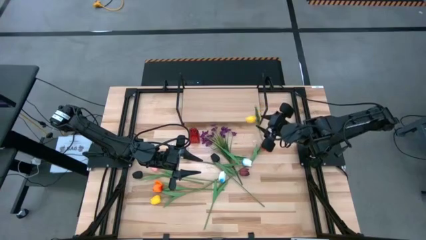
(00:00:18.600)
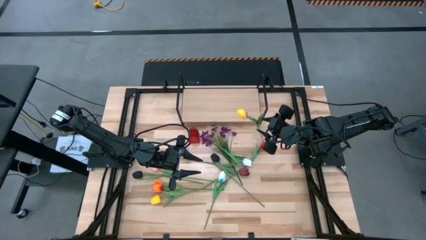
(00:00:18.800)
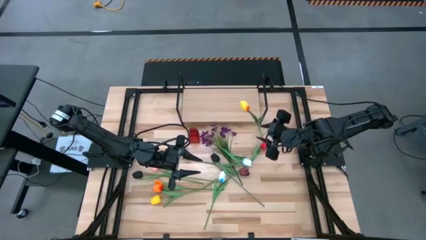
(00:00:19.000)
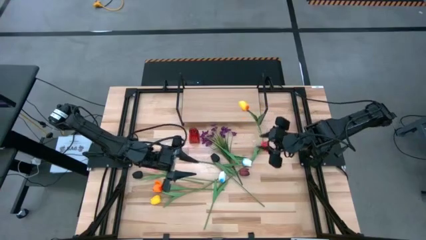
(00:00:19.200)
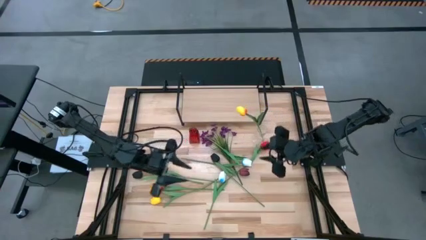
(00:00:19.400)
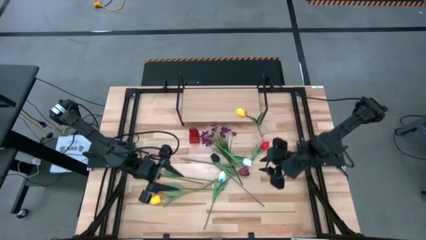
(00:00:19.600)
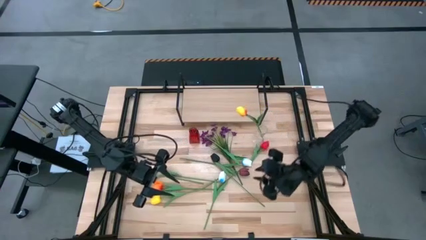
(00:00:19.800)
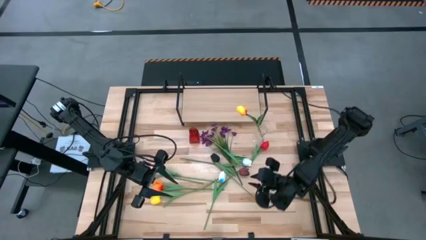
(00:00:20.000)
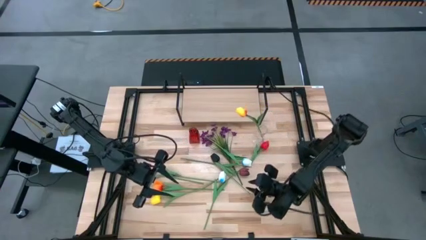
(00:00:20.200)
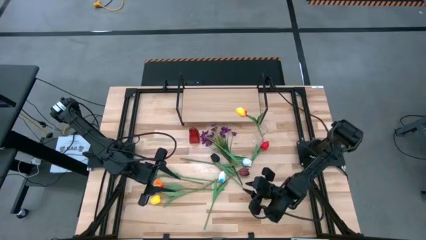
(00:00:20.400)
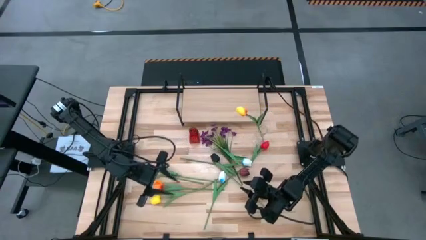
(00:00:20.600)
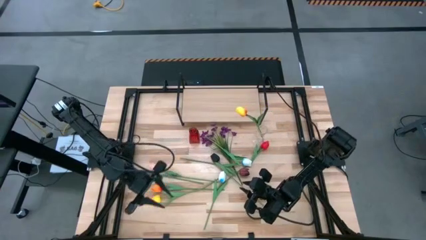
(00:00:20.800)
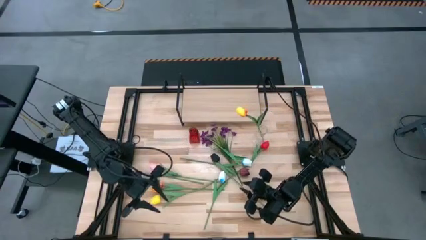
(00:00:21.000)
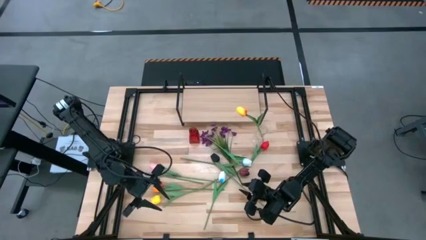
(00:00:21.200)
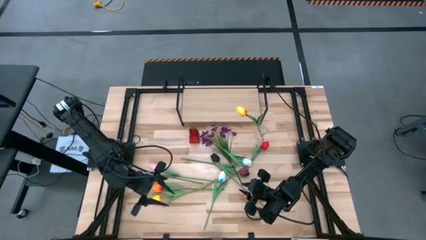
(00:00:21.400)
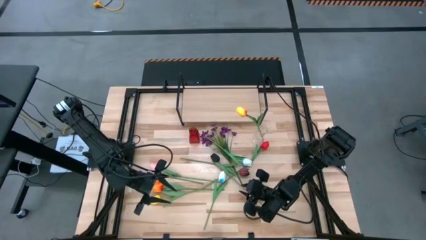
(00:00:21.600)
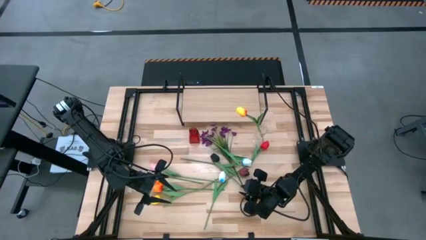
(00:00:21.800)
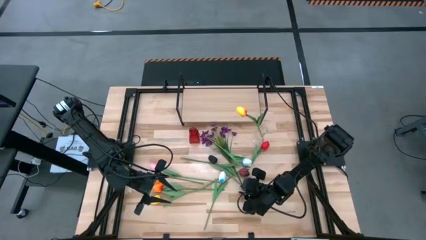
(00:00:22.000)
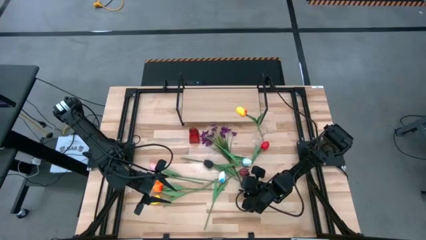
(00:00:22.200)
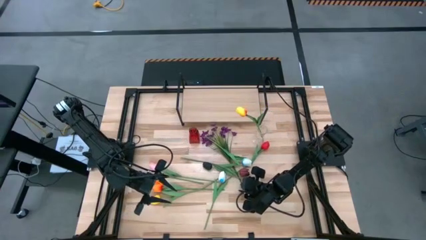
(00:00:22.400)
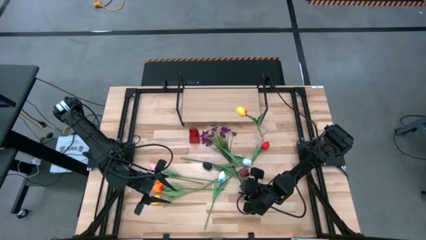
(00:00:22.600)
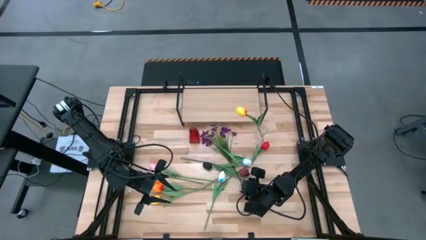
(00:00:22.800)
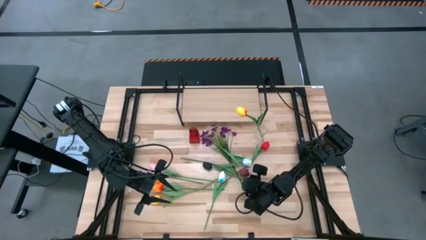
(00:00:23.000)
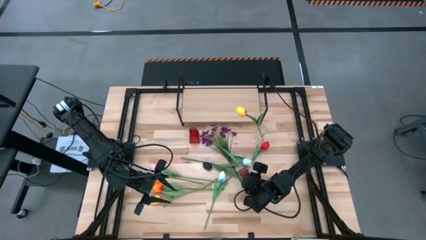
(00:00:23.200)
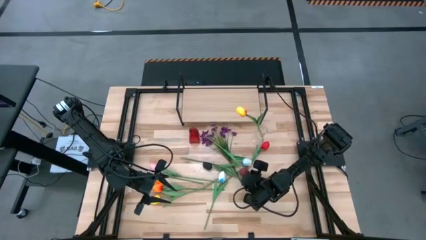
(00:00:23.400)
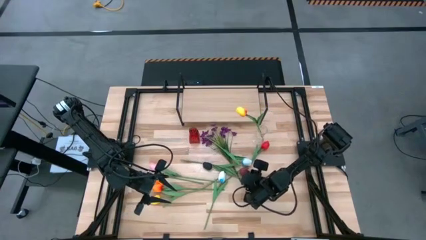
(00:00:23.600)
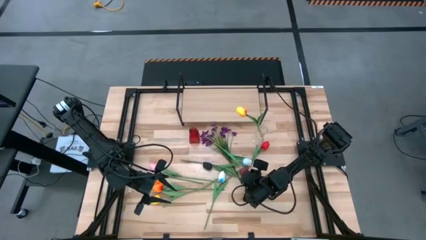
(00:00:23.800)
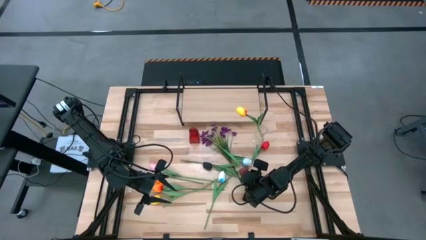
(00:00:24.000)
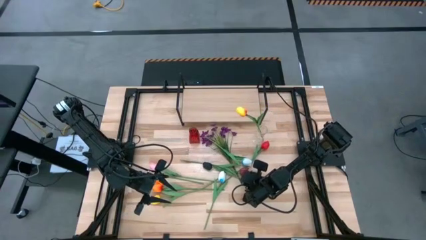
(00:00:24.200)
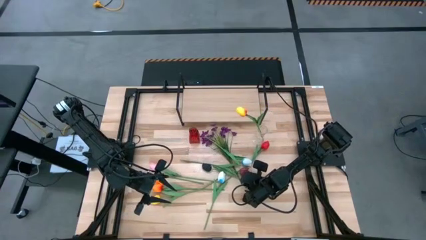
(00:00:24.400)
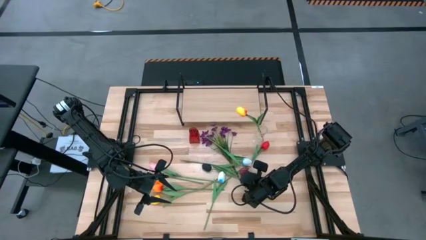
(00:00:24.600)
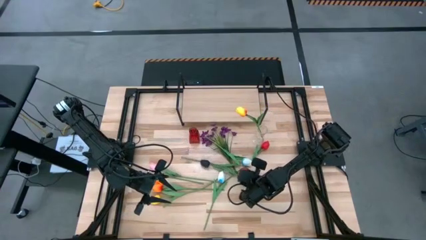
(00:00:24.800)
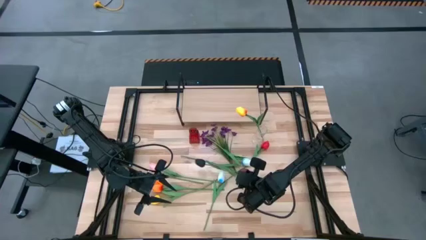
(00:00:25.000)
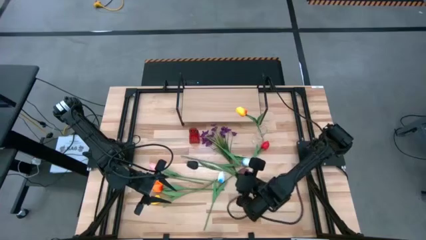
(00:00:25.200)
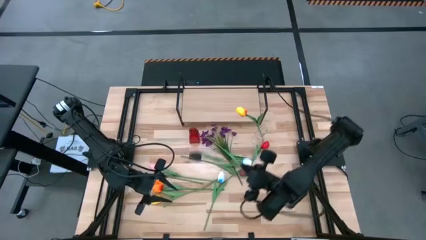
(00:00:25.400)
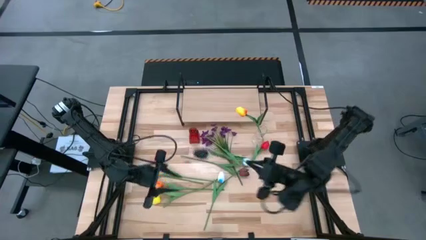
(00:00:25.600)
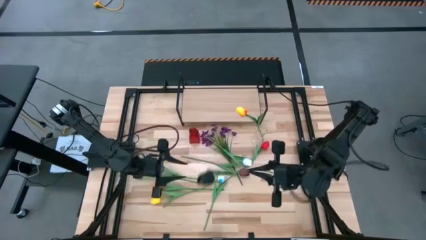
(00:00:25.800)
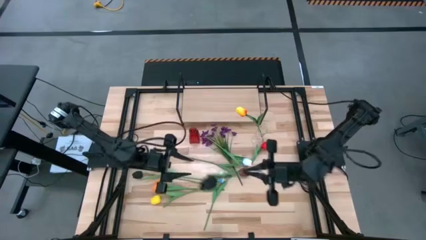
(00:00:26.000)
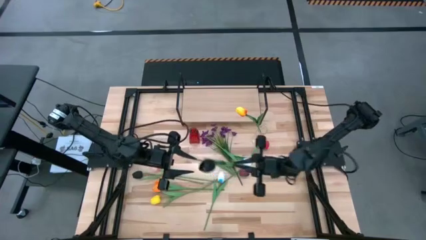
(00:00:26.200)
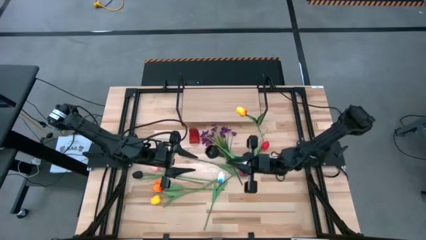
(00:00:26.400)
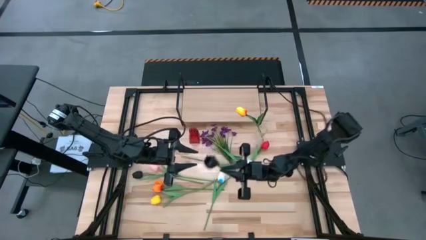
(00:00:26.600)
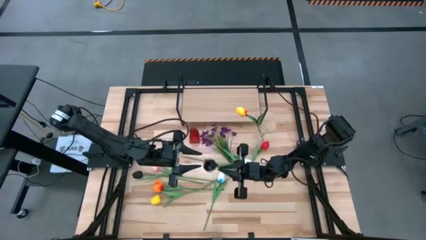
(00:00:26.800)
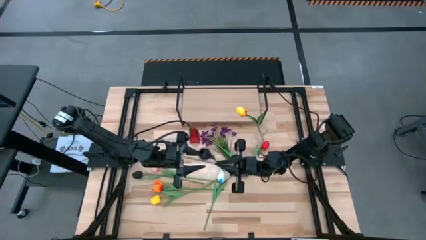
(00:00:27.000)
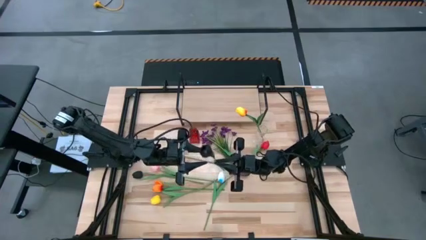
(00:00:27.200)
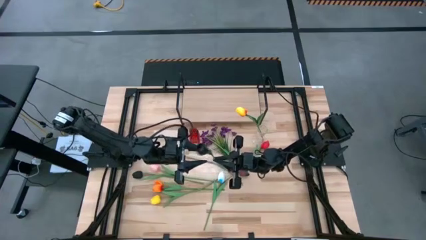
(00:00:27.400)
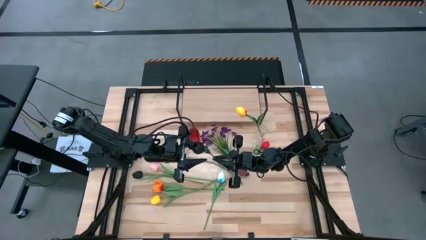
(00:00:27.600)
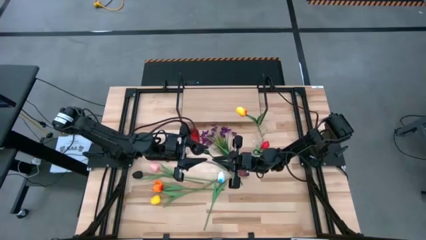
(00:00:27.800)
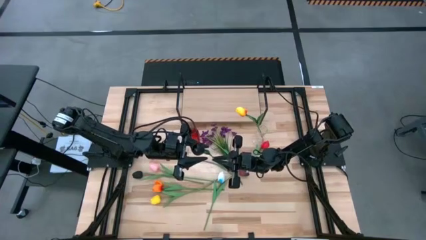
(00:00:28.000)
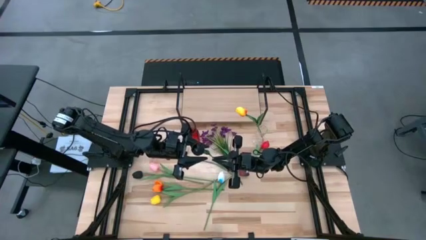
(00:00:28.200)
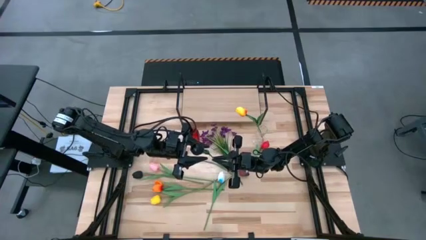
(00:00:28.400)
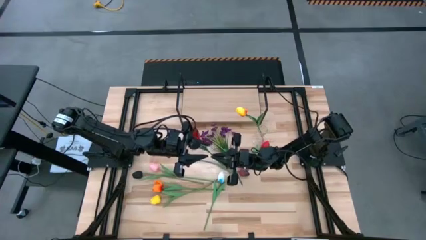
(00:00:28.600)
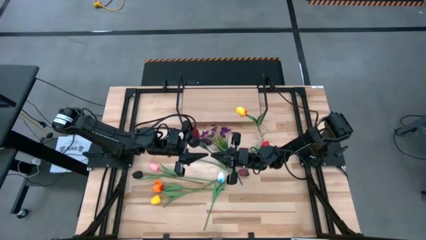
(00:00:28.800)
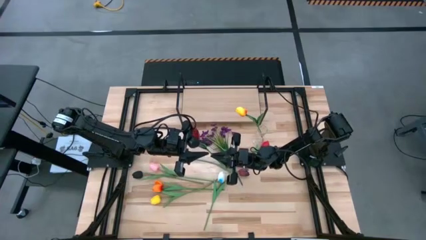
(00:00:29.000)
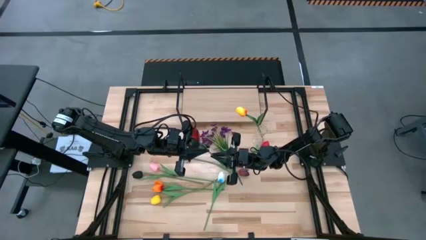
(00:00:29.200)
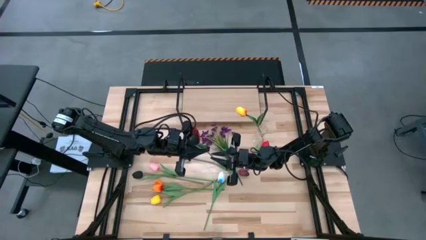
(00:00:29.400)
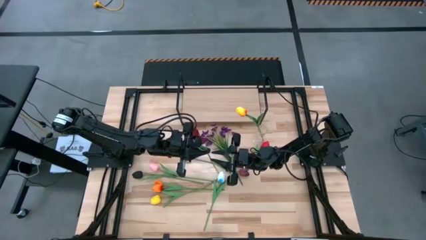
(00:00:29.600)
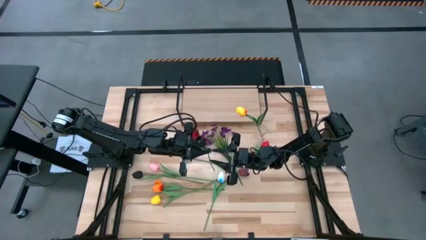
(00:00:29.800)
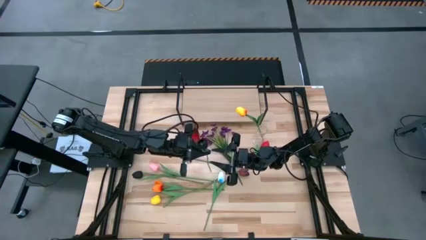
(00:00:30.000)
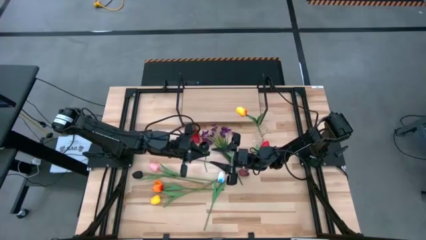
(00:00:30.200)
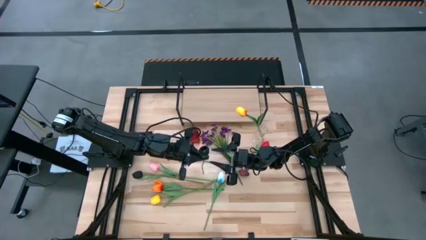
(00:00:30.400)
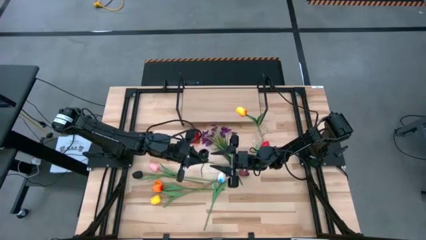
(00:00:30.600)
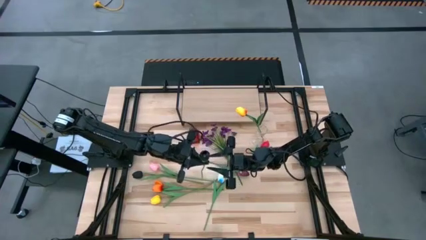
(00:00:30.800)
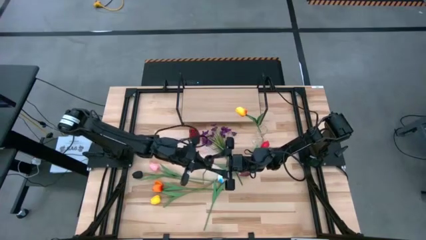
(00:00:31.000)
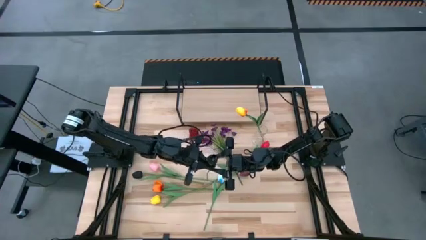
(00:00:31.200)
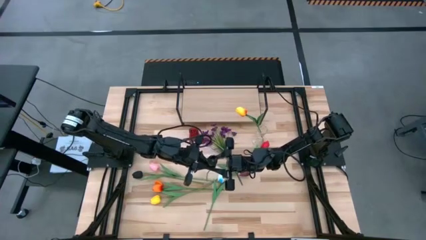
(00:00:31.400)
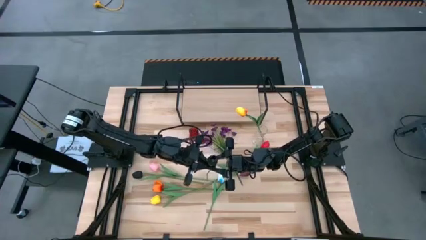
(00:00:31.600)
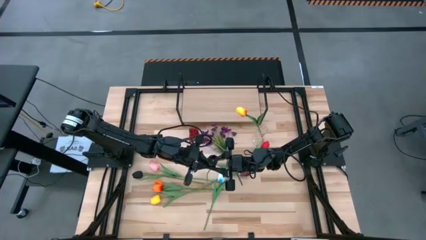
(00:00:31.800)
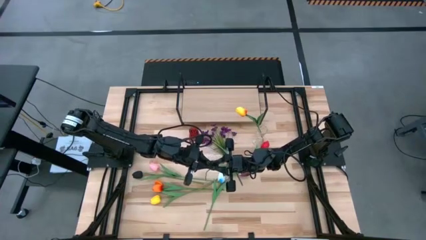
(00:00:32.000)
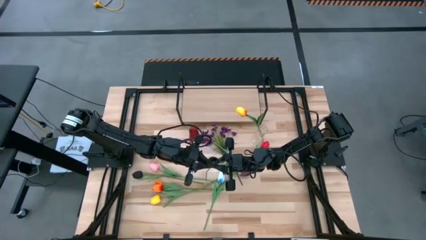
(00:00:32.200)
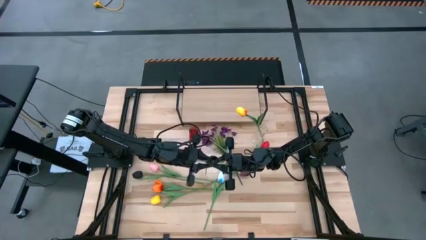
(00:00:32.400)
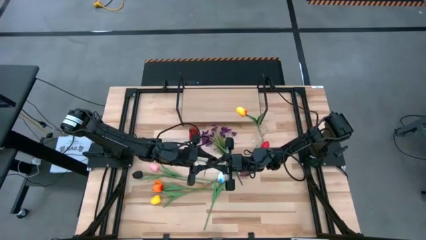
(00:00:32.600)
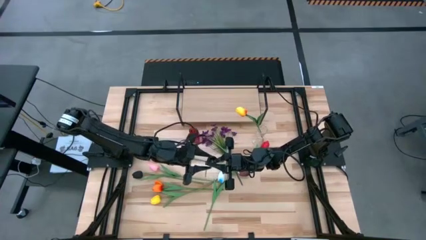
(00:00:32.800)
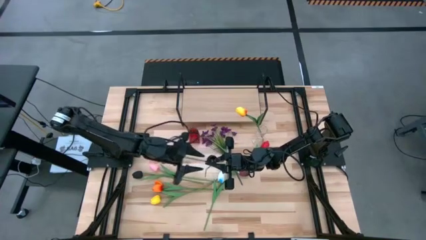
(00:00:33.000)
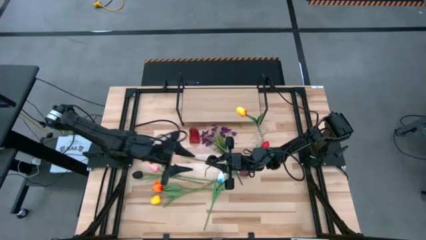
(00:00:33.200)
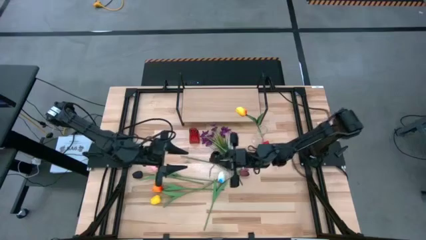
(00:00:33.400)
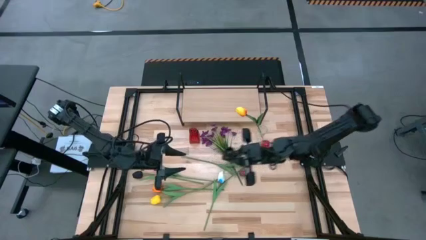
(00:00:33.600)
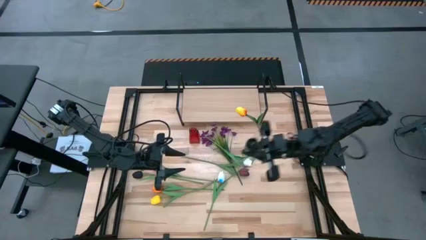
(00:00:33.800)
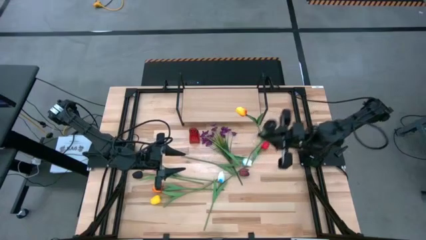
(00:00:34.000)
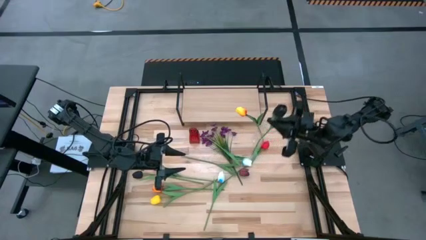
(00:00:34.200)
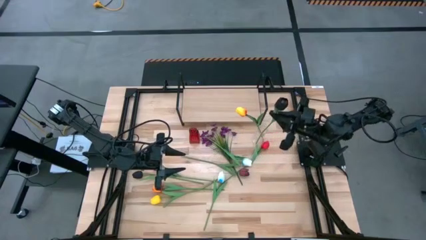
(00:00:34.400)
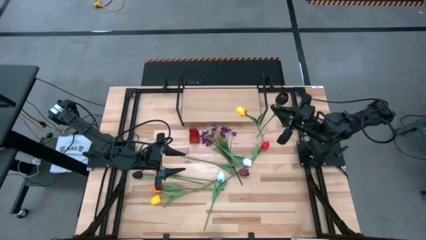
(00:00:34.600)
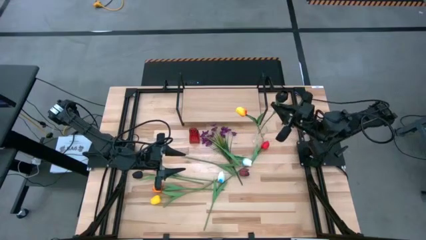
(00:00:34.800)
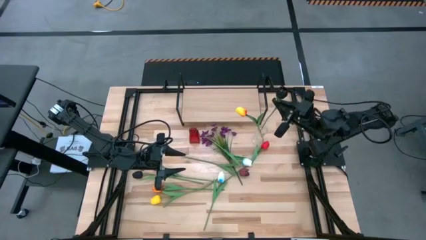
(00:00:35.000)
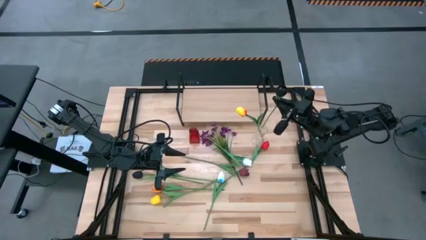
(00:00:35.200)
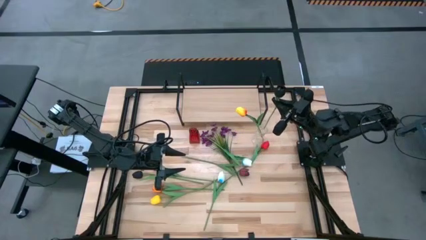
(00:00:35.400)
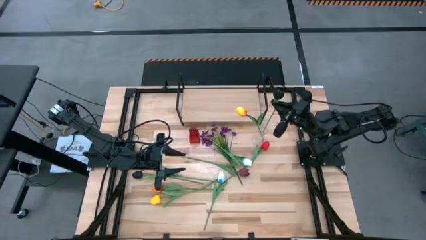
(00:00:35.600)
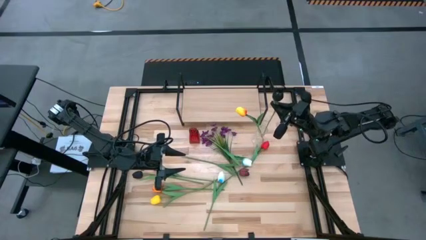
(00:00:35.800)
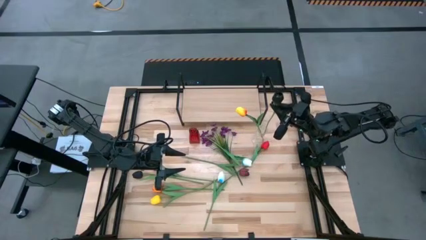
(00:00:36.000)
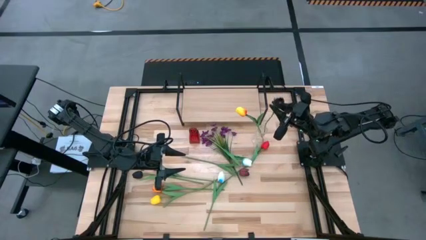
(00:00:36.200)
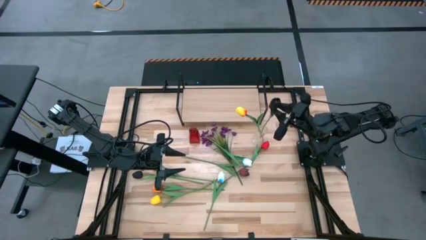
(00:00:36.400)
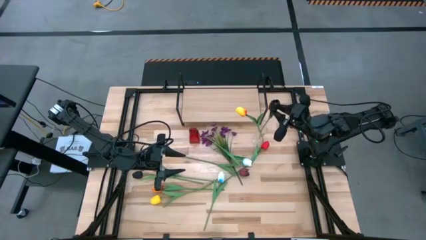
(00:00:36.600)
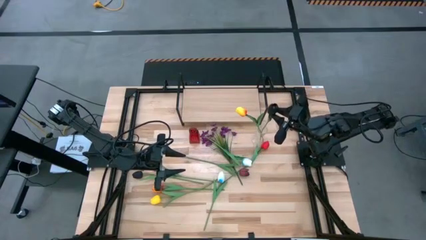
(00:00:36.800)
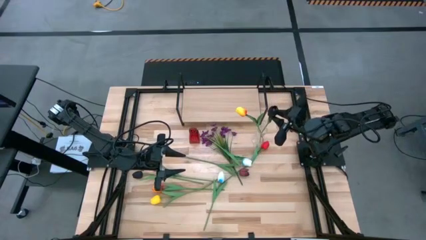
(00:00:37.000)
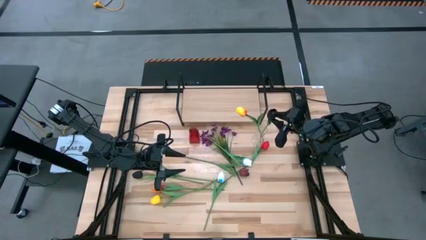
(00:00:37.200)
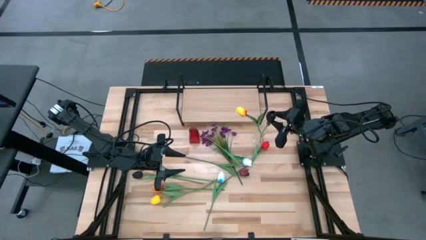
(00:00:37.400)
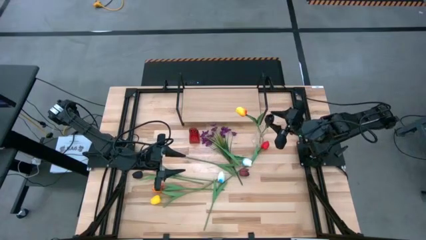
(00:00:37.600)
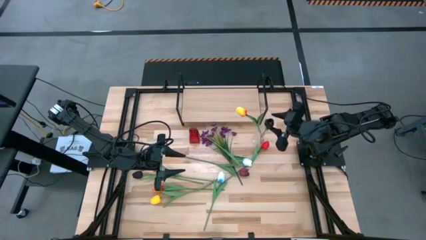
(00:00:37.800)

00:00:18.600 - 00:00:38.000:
Task: Pick and place flowers into a vace then onto a shelf
Put the right black flower into the transparent vase
